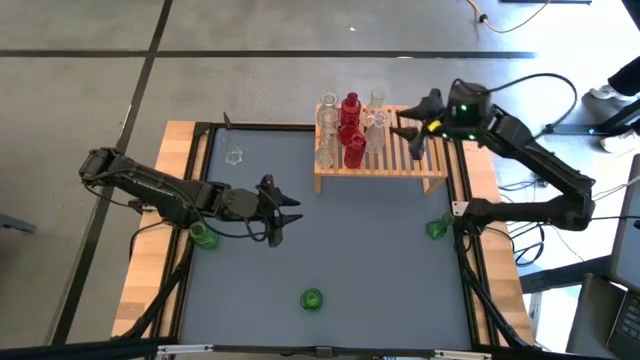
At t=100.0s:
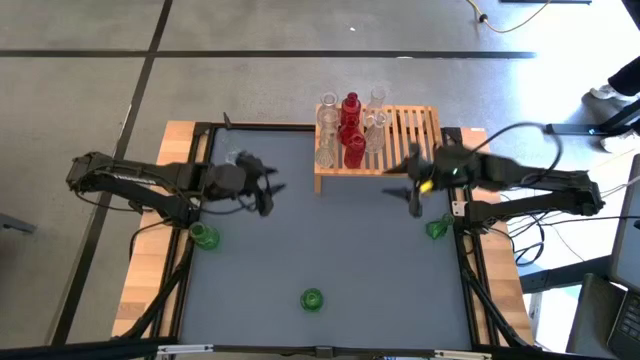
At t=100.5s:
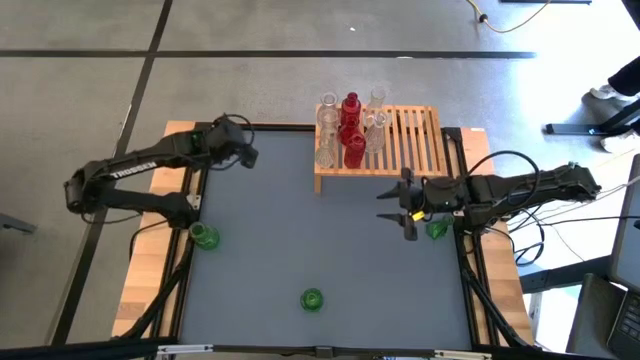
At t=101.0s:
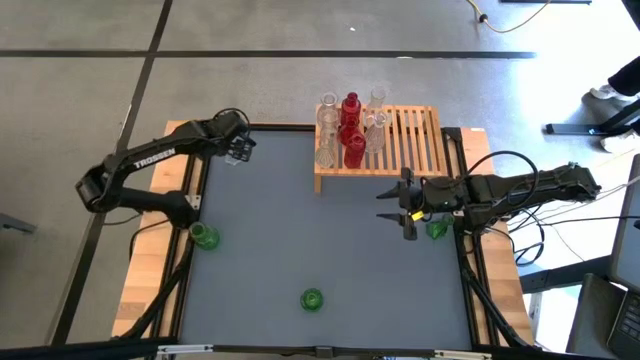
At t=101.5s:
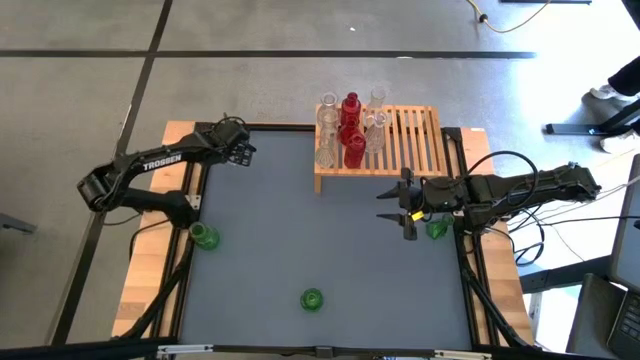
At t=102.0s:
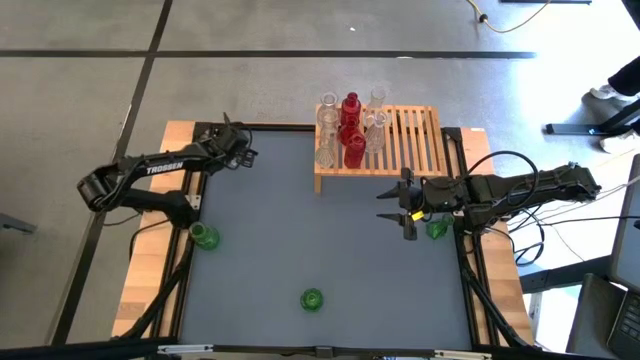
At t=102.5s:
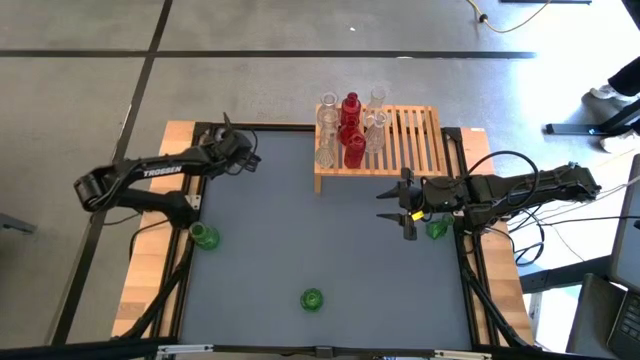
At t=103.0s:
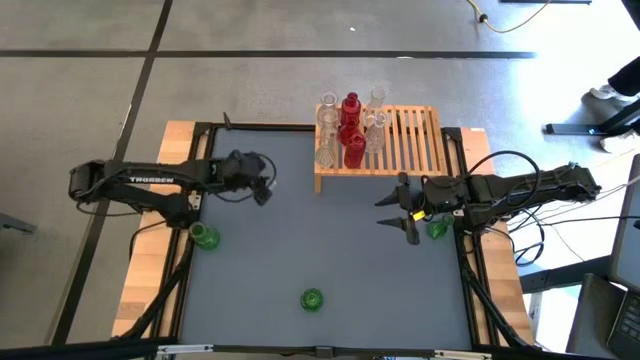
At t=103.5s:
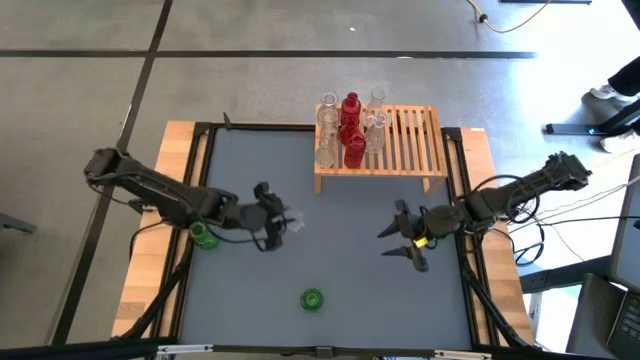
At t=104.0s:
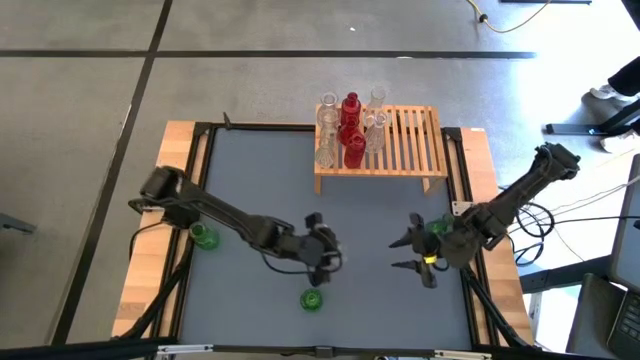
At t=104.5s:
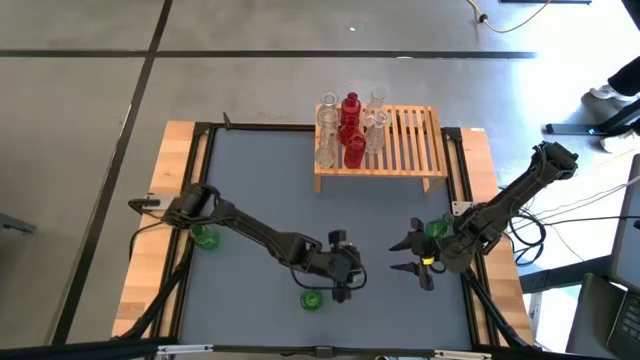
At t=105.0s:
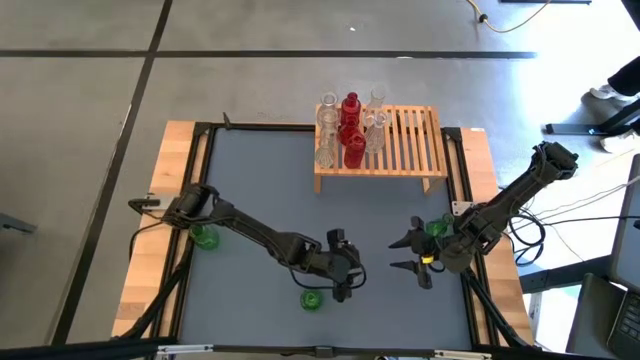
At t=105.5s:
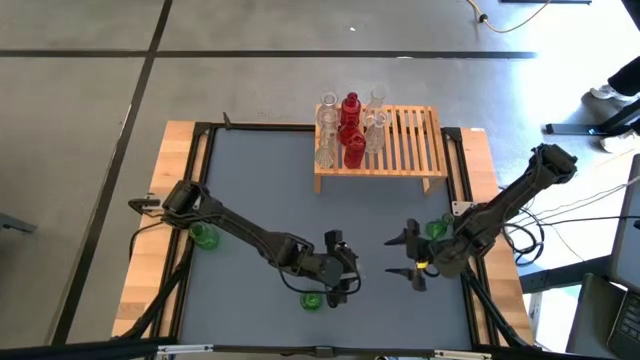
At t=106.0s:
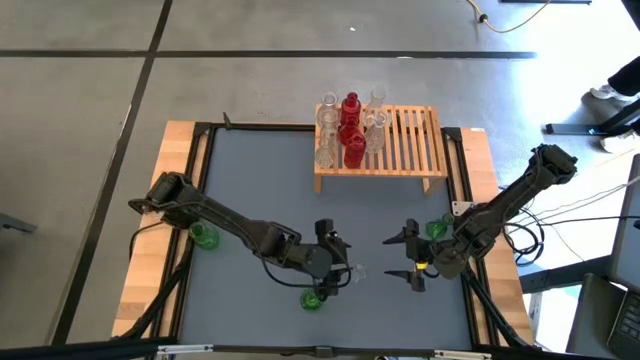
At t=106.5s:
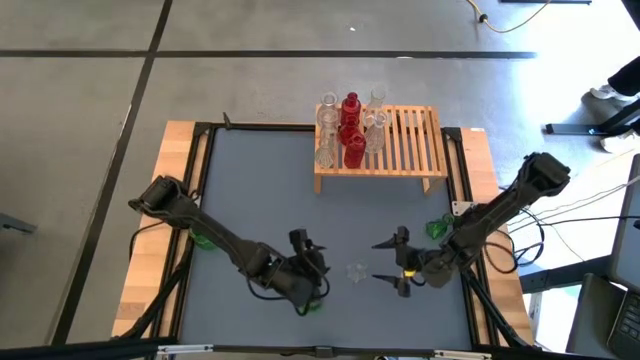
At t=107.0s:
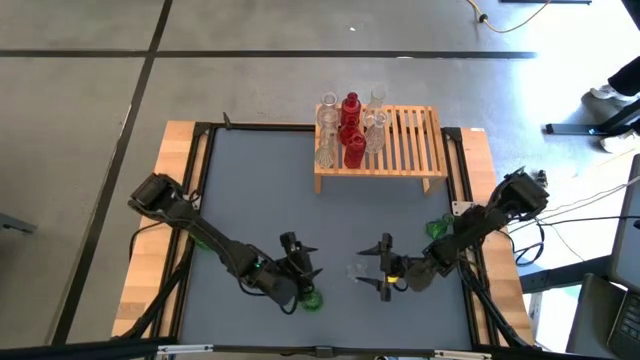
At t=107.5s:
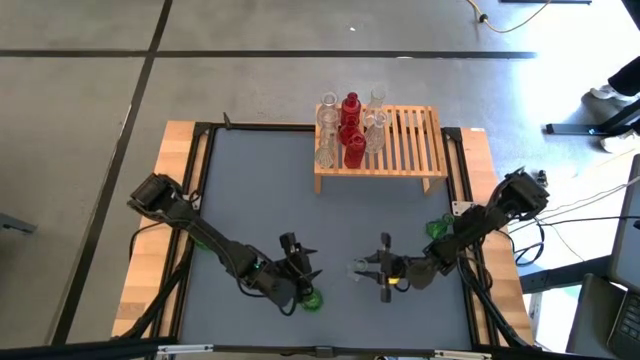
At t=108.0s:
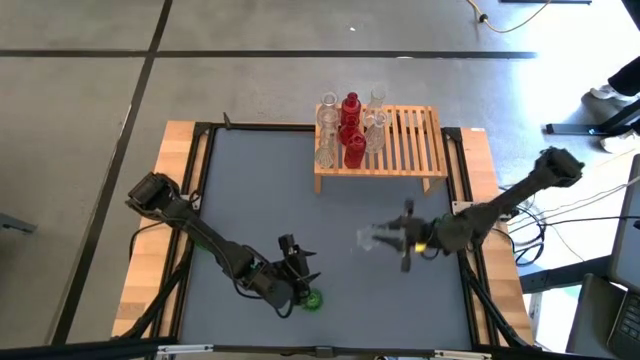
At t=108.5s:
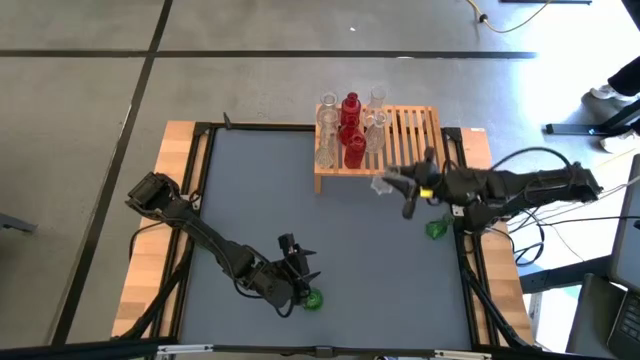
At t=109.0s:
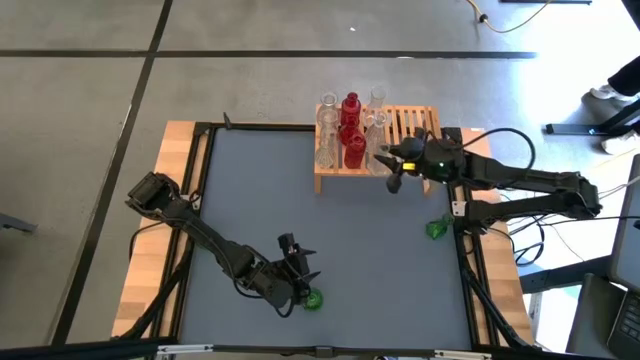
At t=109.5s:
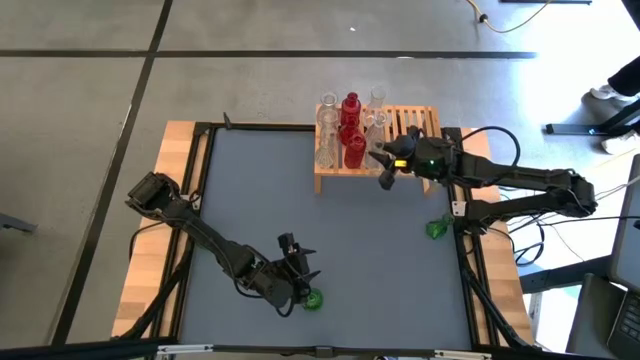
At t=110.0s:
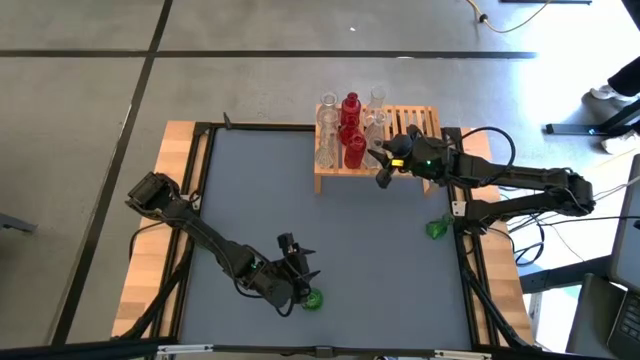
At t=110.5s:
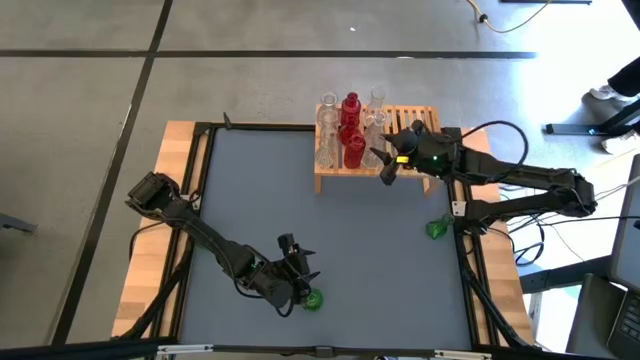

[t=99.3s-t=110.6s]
Task: sort vases onto shelf
Put the top transparent vase onto the shelf aligned with the other transparent vase

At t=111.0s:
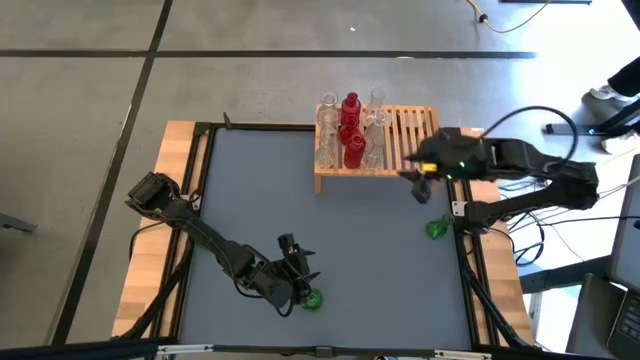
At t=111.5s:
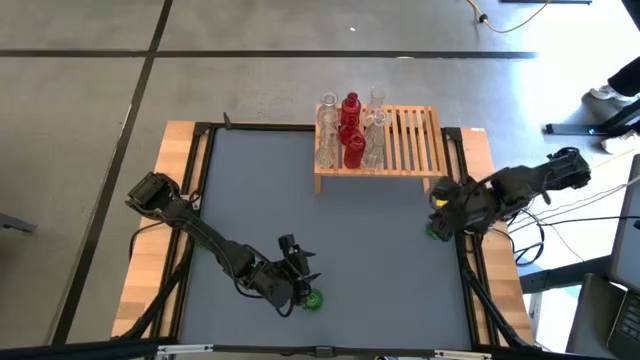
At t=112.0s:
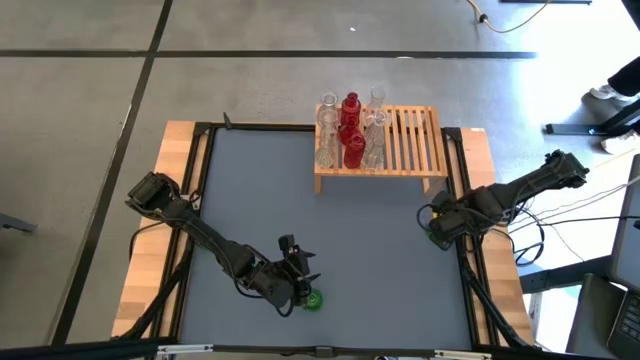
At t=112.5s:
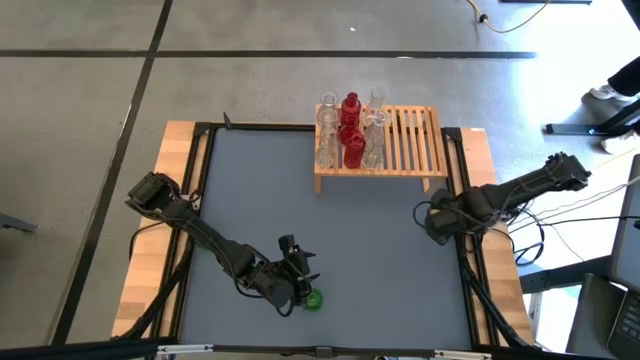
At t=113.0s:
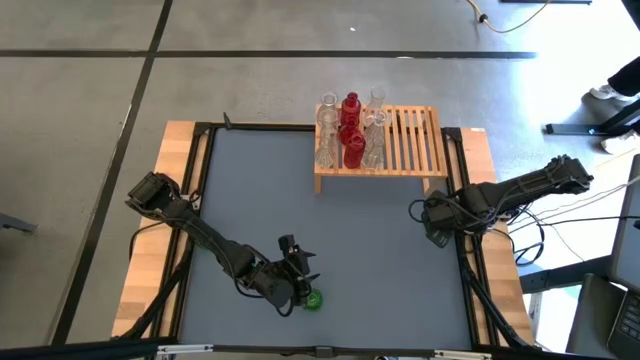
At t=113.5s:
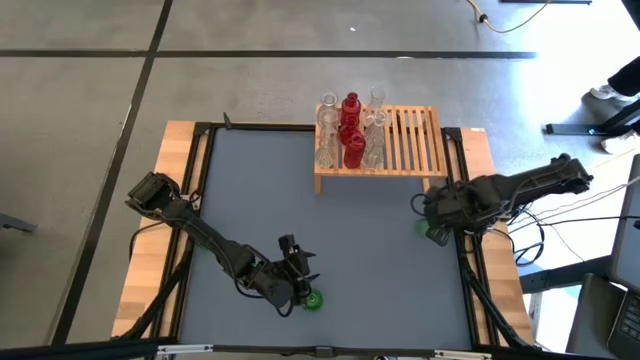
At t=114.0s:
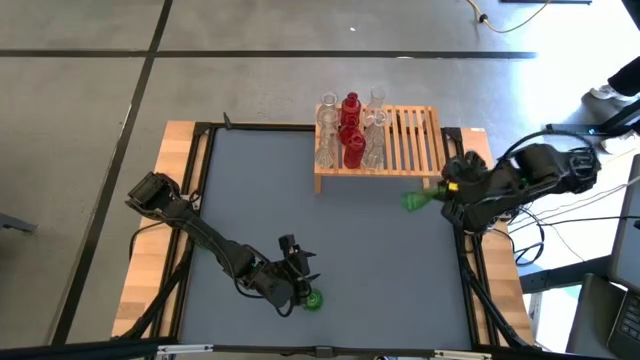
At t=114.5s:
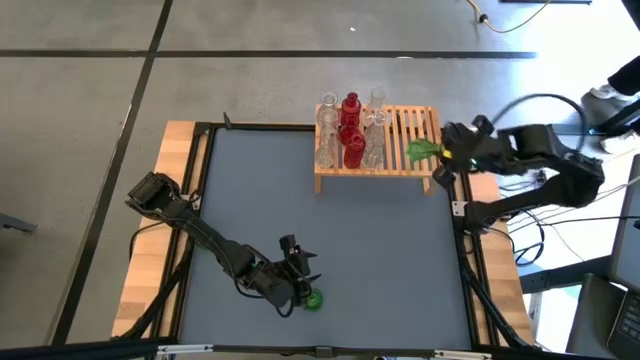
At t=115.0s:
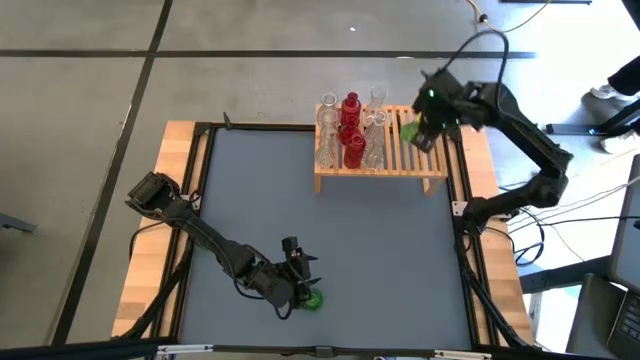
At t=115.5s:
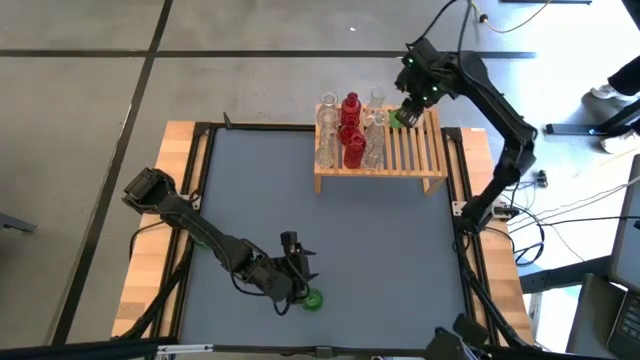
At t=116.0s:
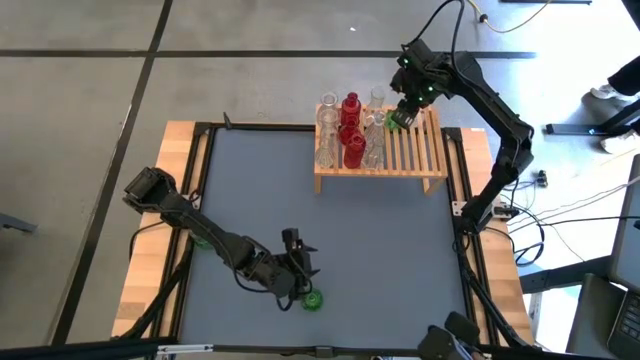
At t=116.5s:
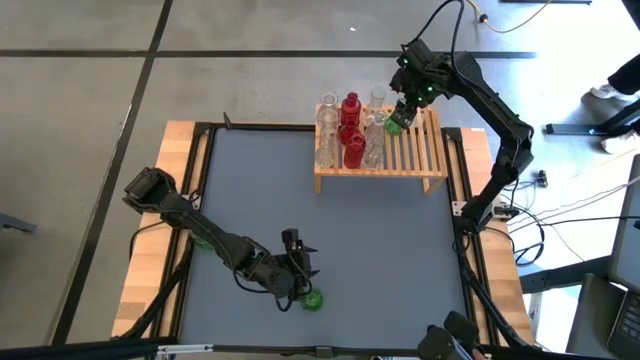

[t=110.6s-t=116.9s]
Put the right green vase onto the shelf

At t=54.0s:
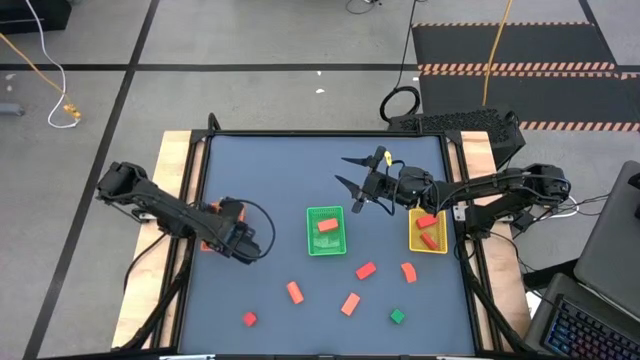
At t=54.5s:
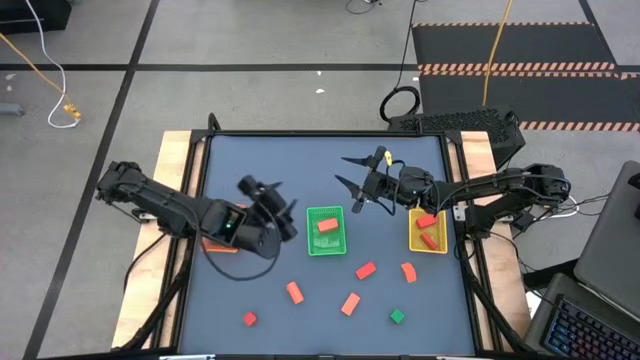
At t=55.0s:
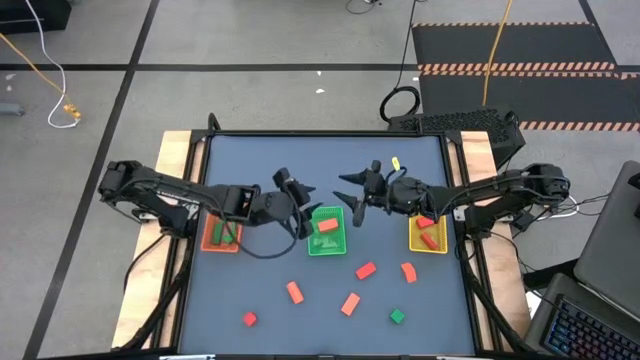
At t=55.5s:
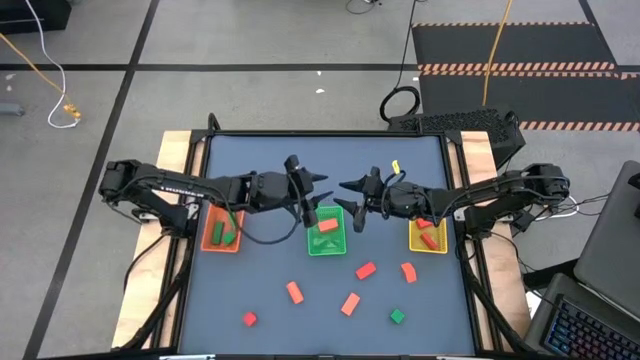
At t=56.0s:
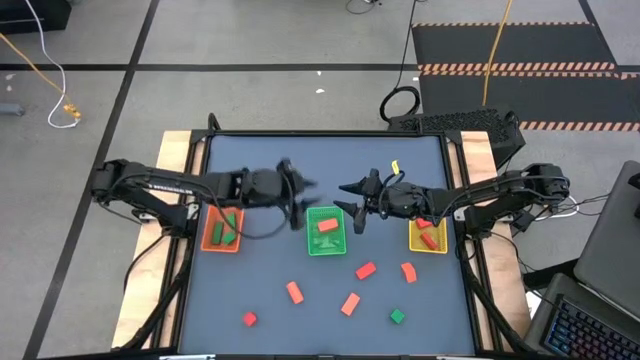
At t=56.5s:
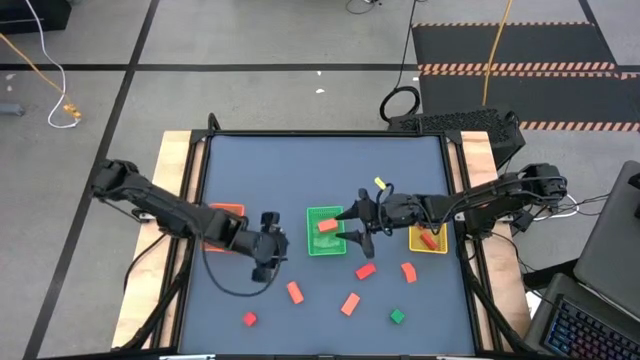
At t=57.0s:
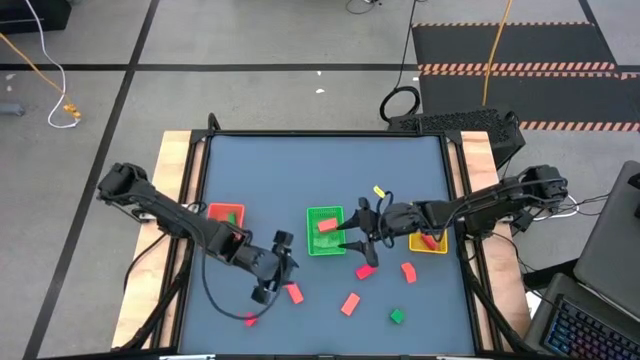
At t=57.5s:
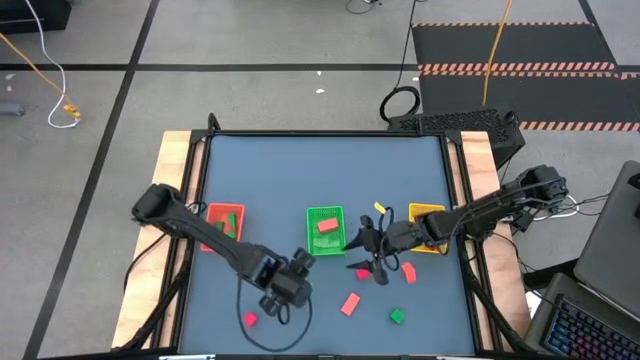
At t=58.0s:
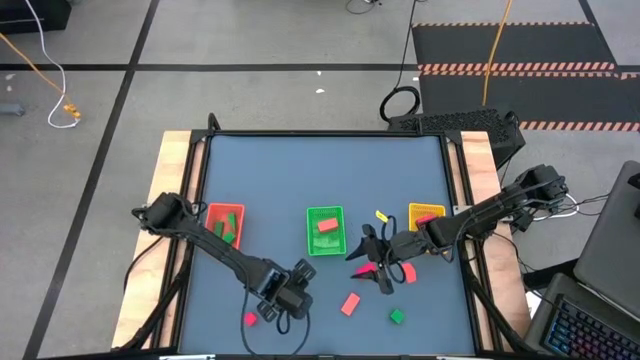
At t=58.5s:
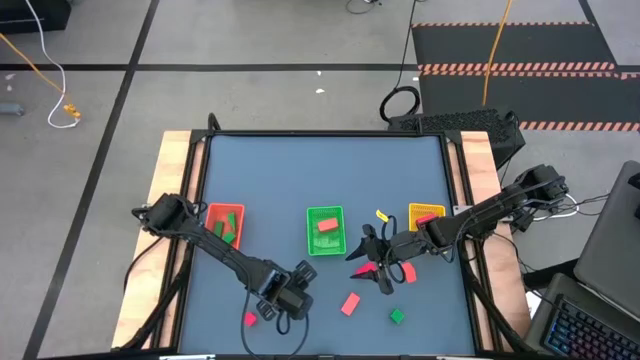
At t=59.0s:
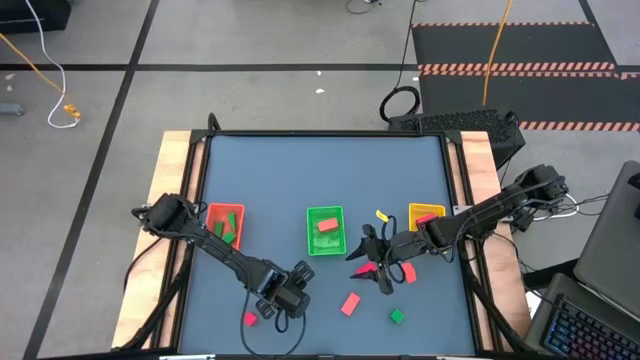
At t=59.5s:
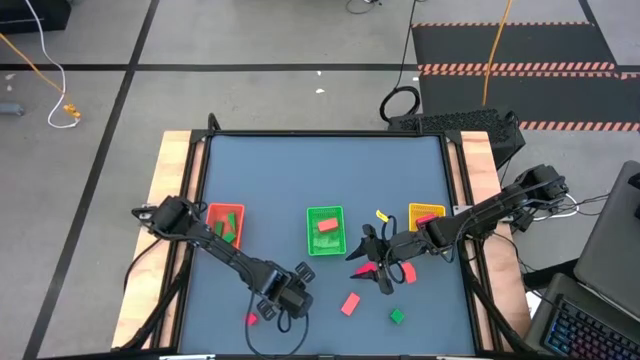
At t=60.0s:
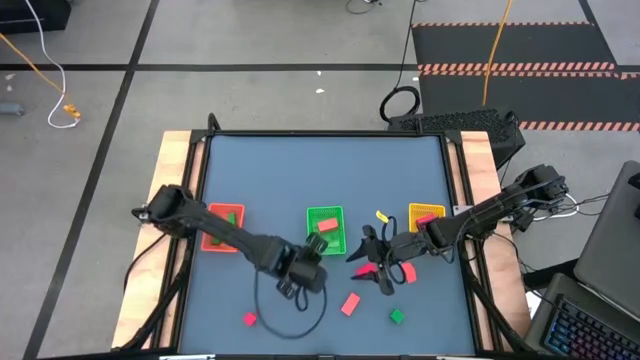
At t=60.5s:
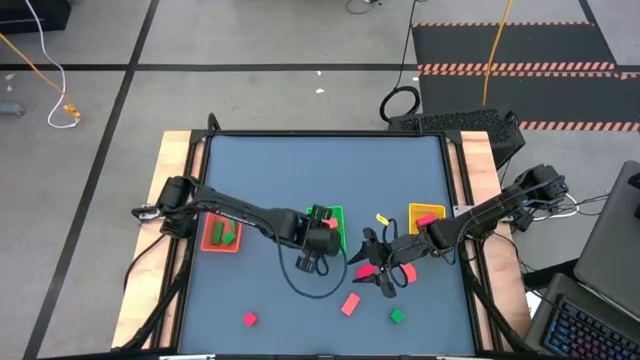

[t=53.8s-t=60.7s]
Task: Sort & place blocks by color
Put the orange block into the green bin
